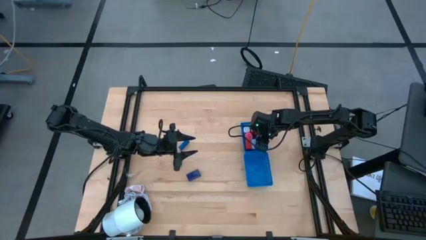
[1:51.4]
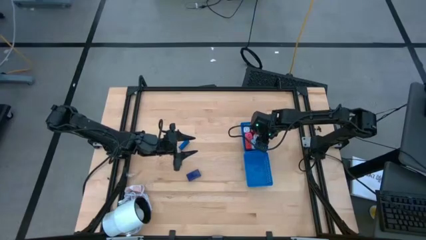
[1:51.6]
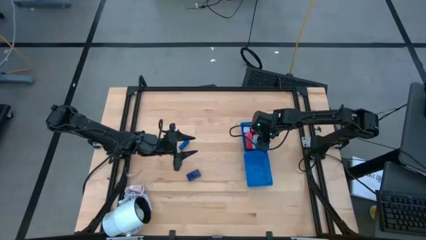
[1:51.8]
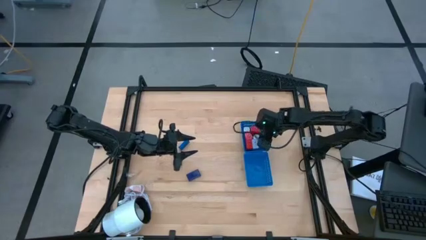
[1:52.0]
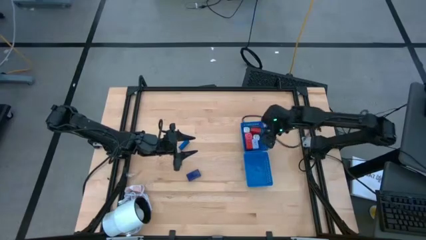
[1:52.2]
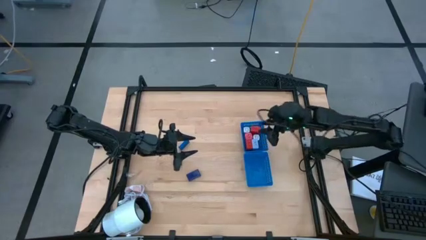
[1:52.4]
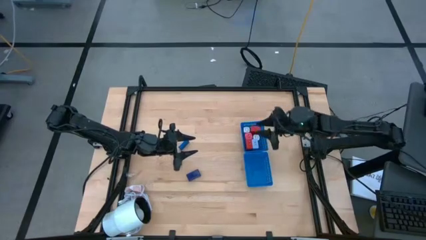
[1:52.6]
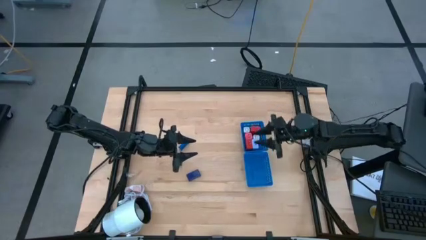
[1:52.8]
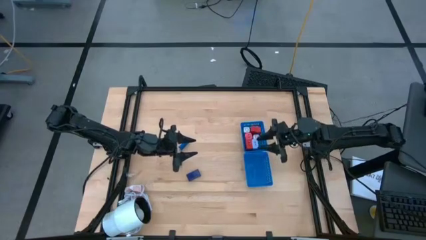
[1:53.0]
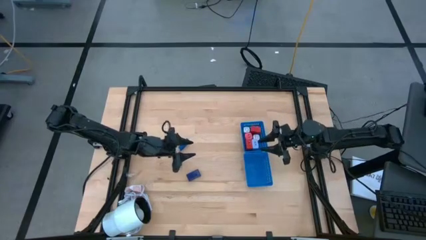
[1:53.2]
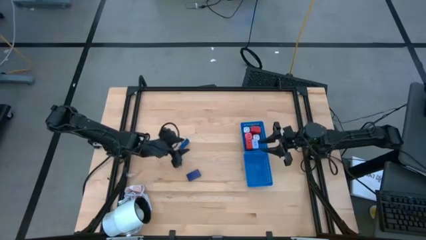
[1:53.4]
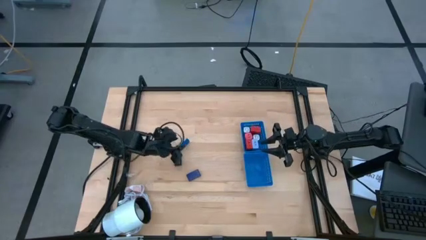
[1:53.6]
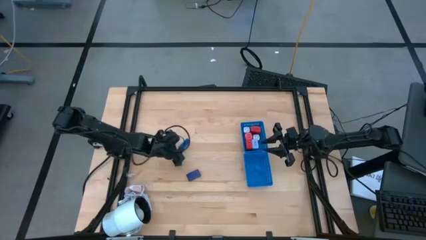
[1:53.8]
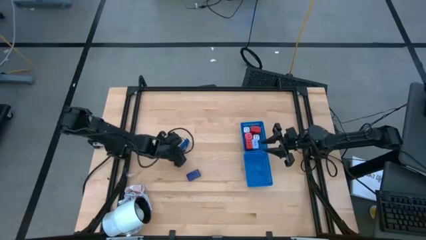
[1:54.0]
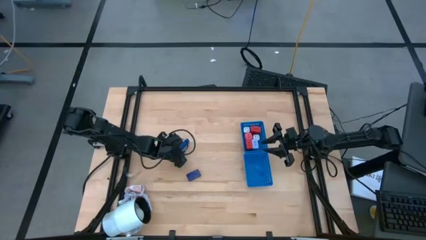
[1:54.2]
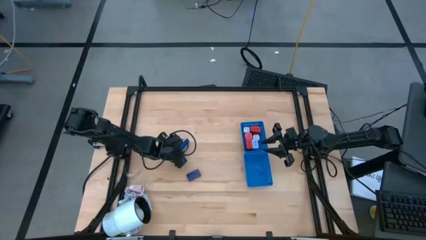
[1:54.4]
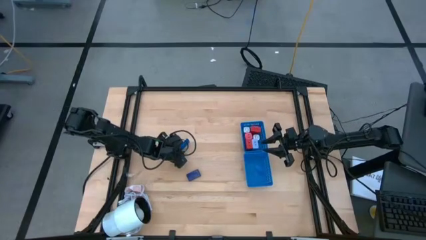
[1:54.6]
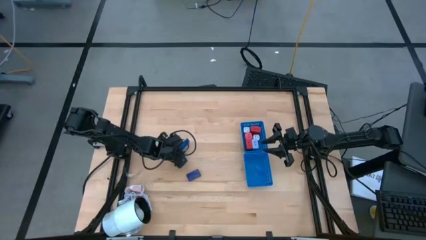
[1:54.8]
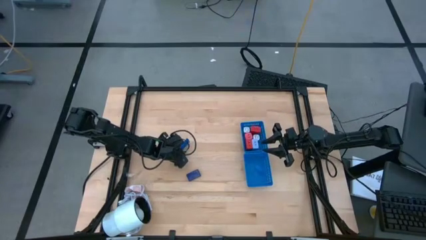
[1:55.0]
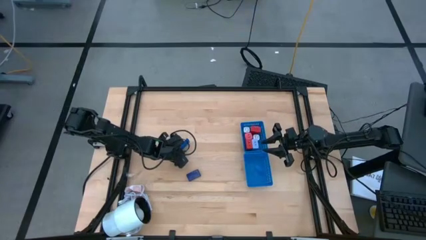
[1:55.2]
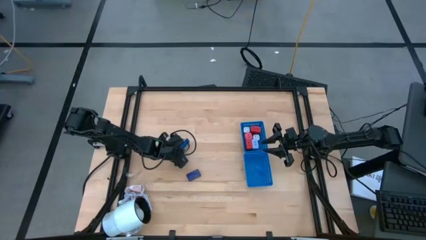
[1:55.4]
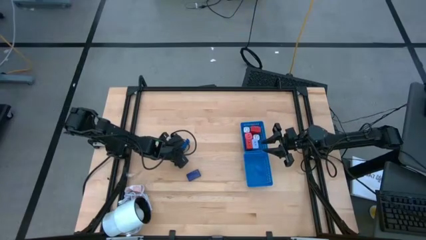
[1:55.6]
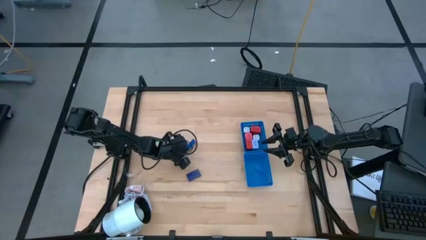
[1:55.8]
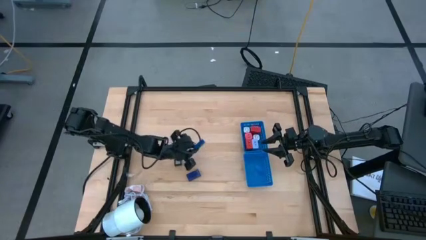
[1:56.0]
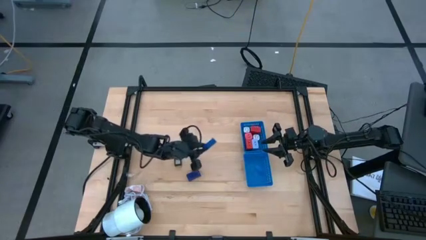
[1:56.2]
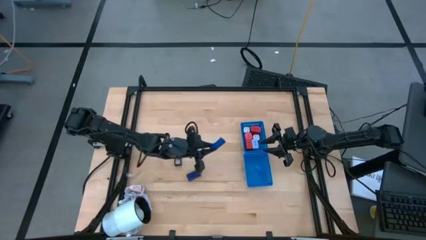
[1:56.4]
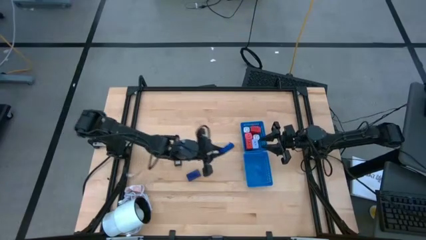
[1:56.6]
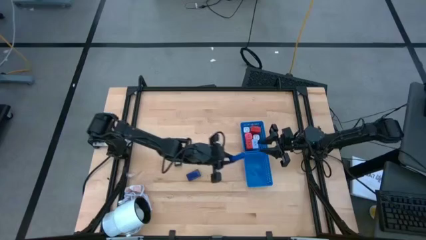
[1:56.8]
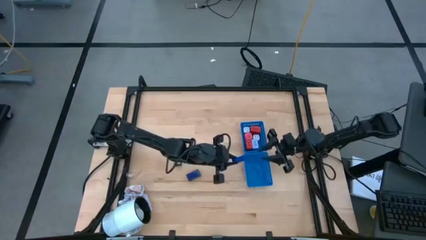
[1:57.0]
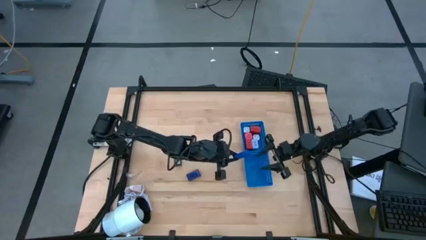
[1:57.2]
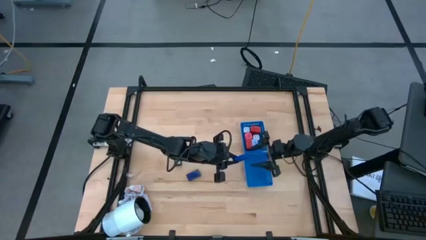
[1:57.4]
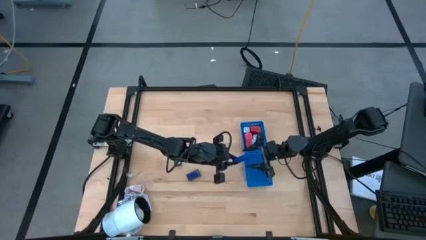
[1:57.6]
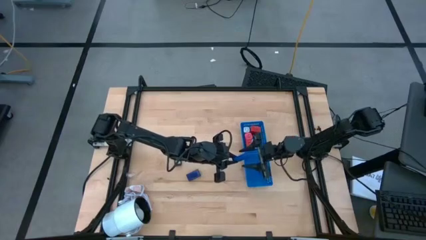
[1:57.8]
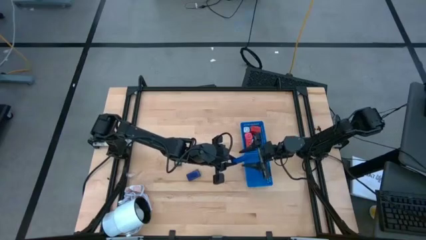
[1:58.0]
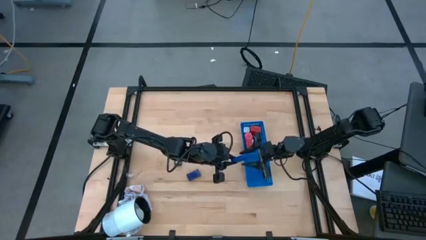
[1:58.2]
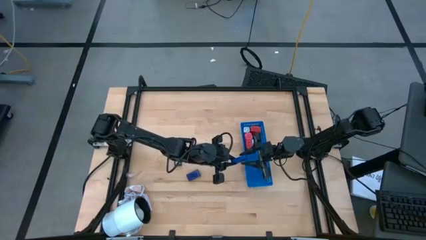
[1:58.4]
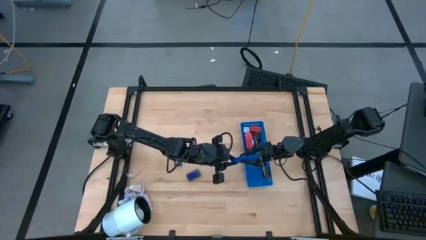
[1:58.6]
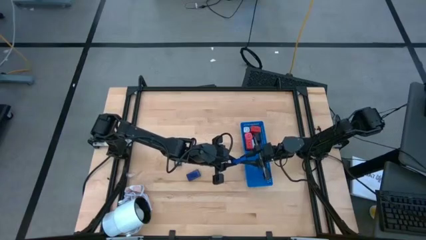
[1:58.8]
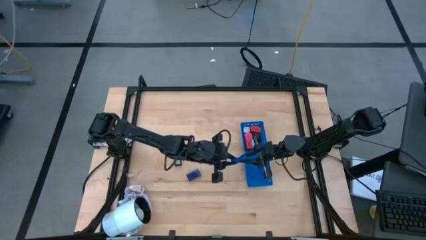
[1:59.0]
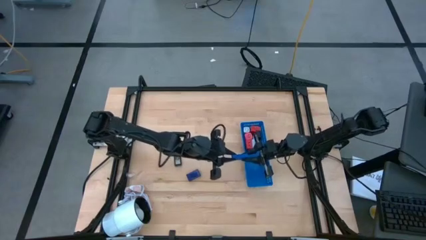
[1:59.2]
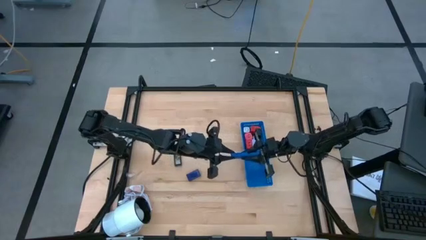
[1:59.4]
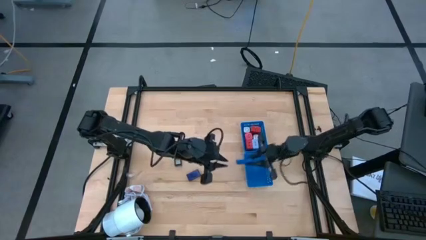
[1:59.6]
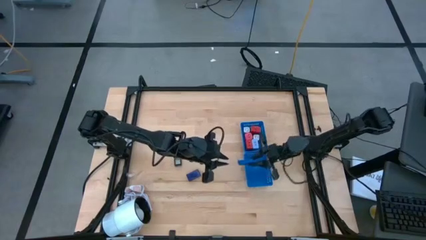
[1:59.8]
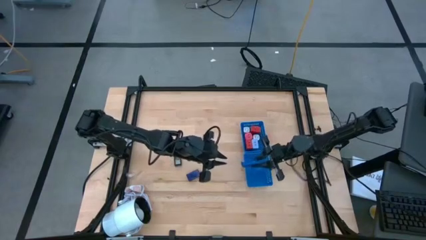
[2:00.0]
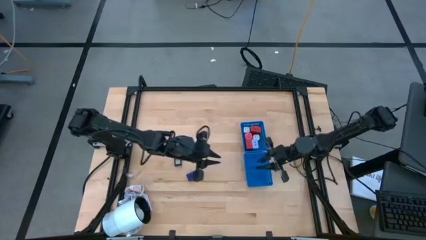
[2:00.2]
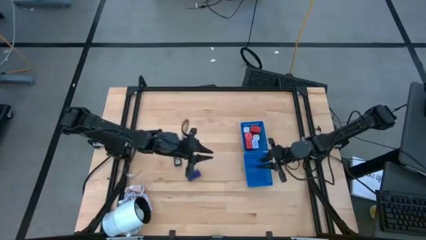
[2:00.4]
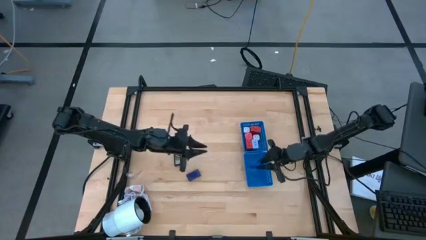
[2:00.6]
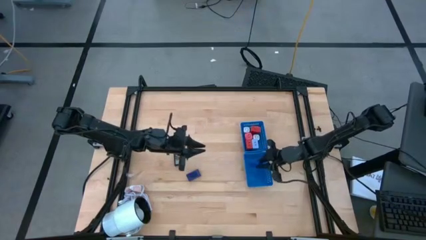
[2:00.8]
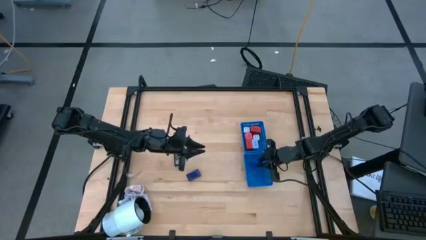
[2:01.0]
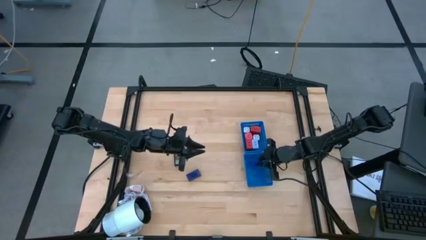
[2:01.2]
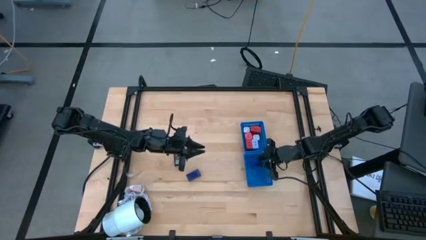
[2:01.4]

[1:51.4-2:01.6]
Task: Pick & Place Office items
Put the blue digital timer into the bottom blue bin

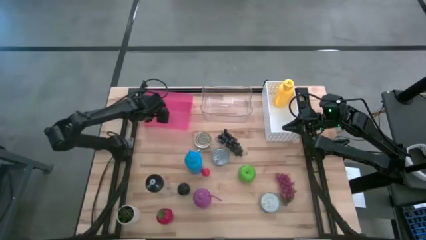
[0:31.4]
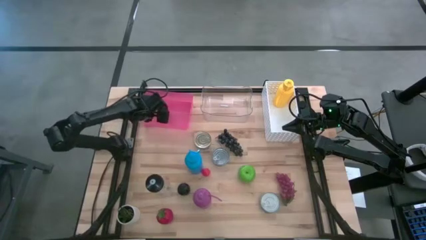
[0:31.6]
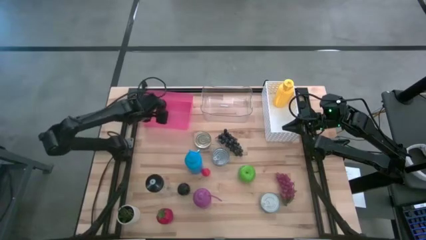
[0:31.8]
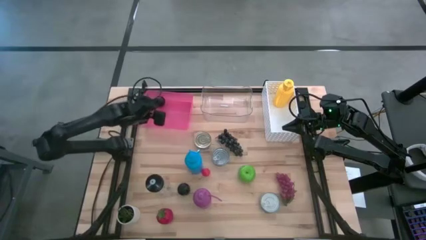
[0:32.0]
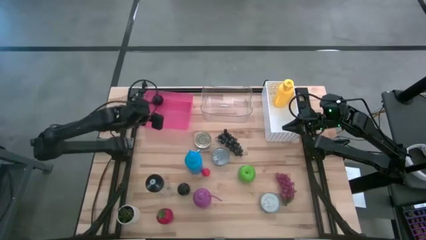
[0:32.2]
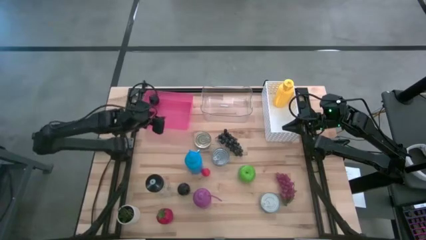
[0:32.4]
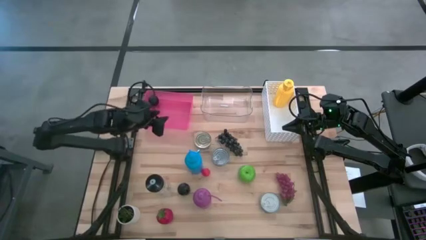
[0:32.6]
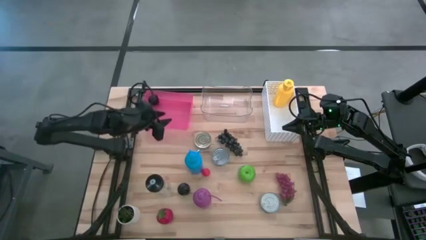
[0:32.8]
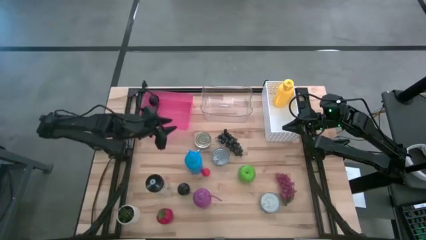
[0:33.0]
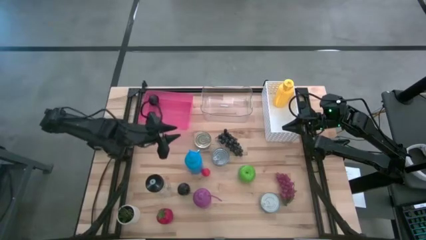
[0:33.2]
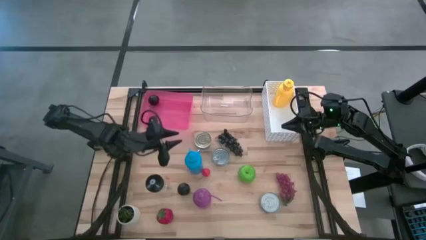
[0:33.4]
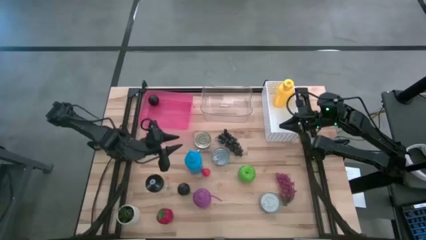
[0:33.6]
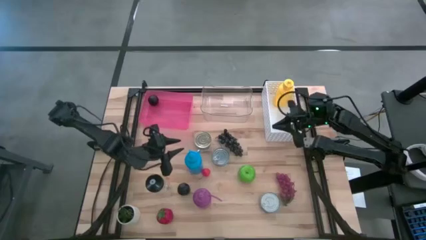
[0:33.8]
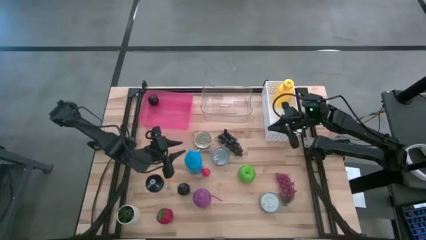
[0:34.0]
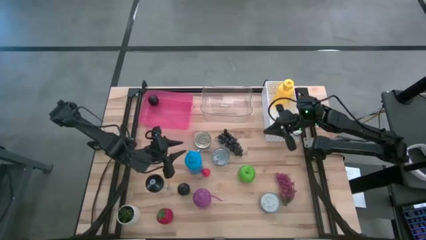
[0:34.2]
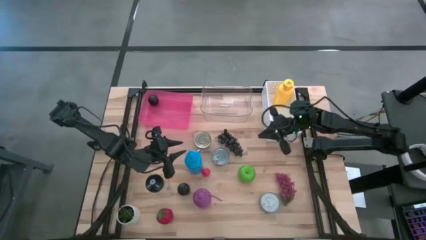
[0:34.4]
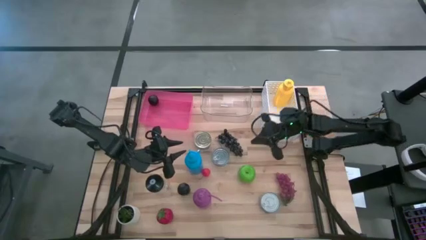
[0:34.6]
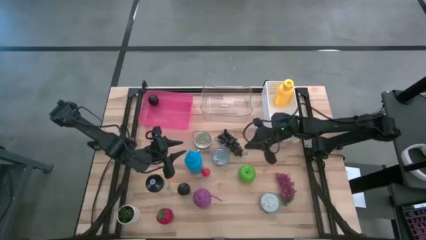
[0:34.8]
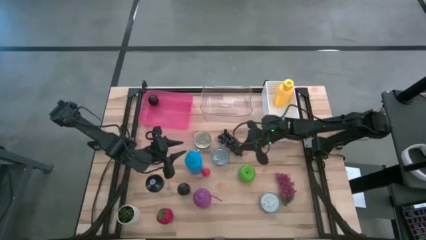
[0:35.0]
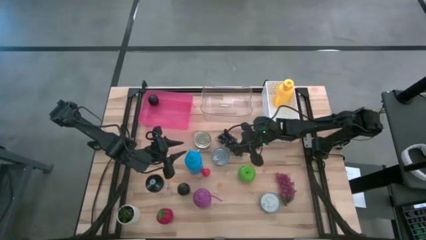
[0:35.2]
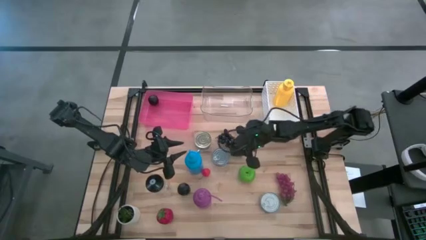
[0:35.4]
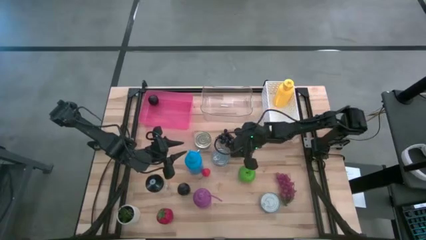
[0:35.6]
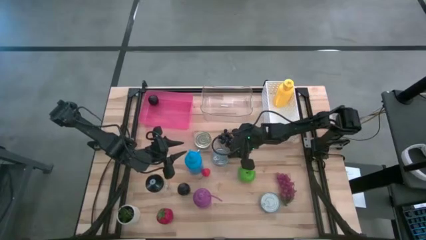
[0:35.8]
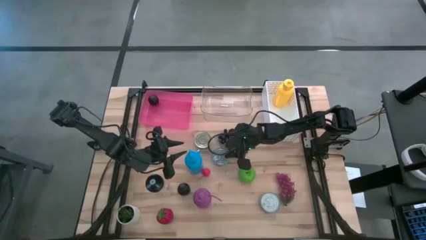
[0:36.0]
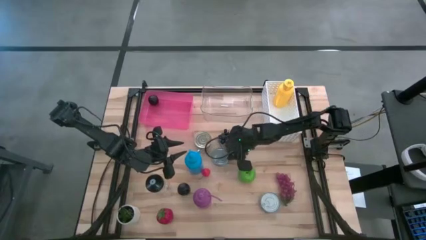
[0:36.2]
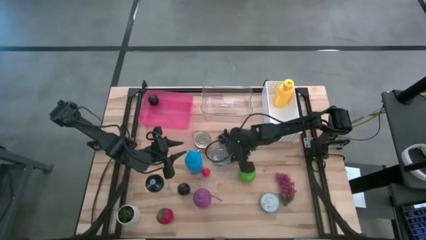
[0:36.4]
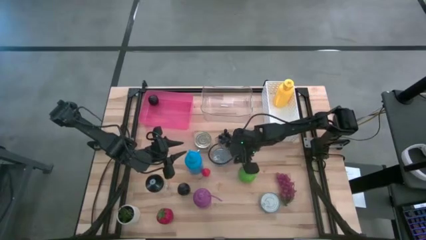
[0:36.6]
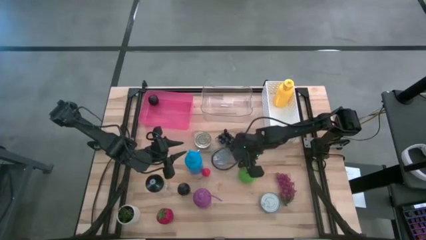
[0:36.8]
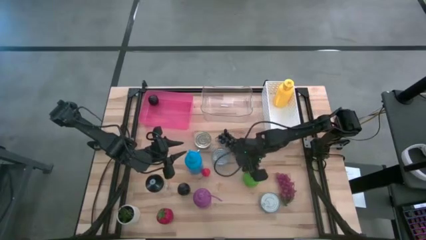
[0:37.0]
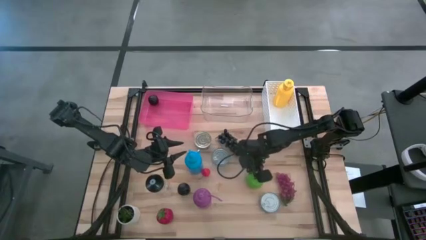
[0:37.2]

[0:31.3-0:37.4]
Task: Pick & Place Food Item
Adjust the green apple on the table
